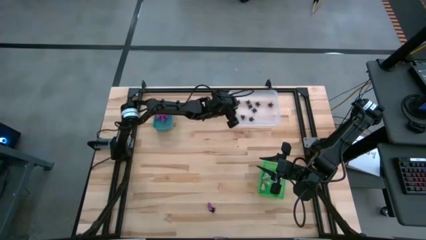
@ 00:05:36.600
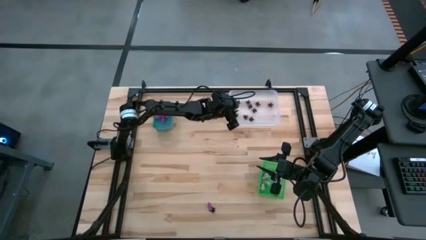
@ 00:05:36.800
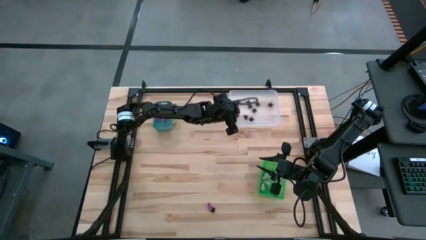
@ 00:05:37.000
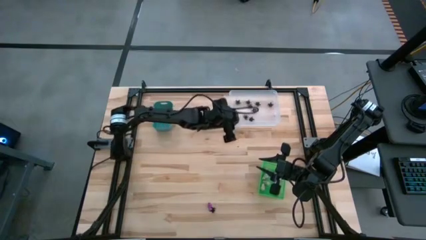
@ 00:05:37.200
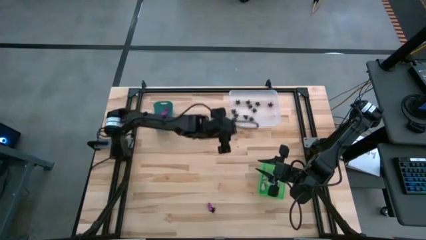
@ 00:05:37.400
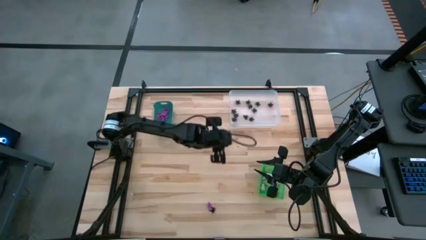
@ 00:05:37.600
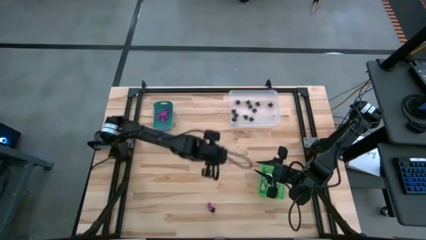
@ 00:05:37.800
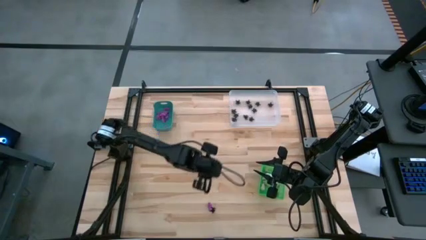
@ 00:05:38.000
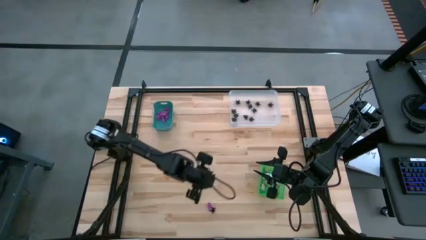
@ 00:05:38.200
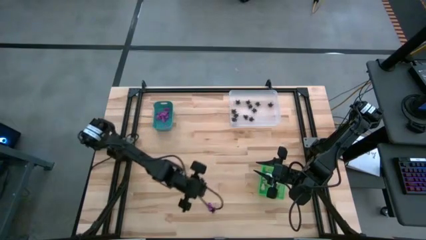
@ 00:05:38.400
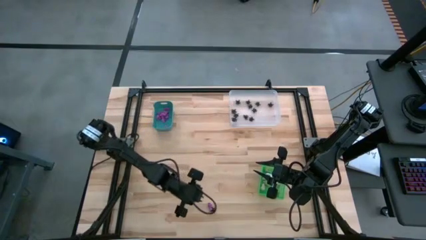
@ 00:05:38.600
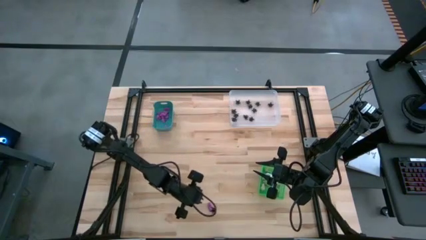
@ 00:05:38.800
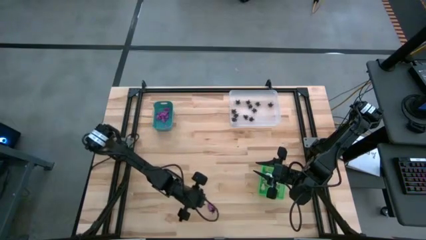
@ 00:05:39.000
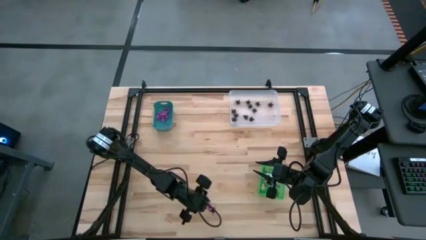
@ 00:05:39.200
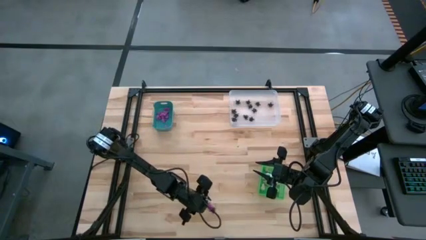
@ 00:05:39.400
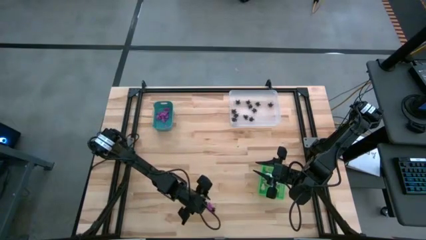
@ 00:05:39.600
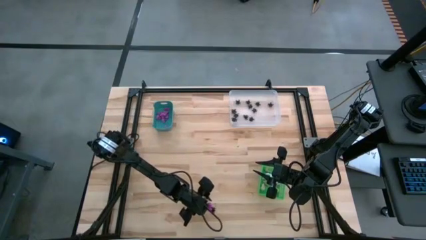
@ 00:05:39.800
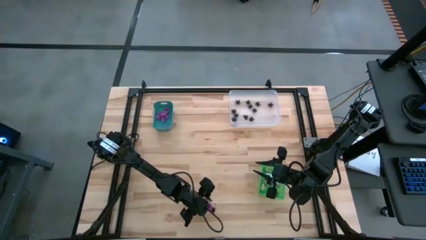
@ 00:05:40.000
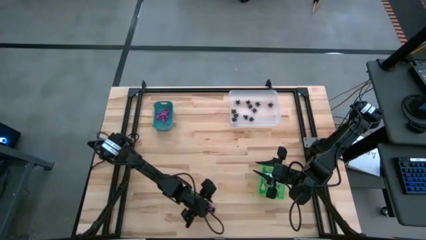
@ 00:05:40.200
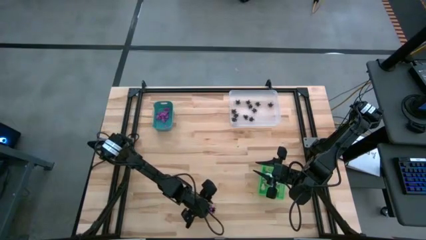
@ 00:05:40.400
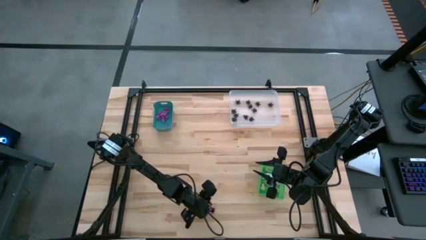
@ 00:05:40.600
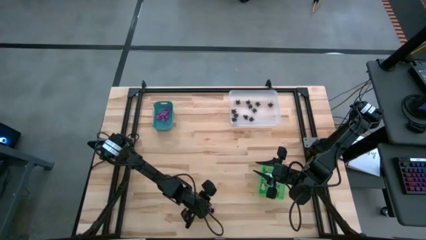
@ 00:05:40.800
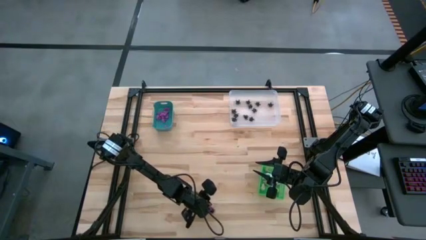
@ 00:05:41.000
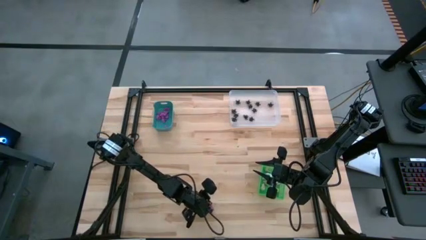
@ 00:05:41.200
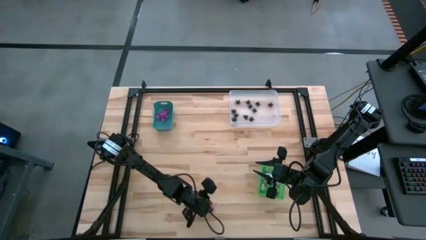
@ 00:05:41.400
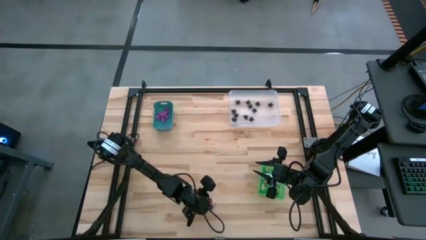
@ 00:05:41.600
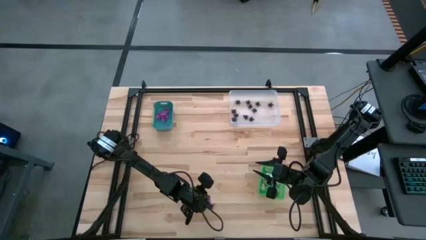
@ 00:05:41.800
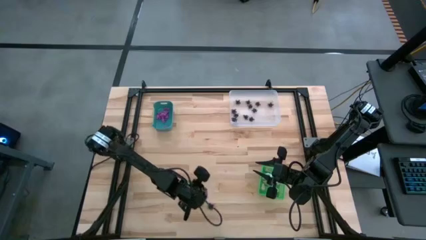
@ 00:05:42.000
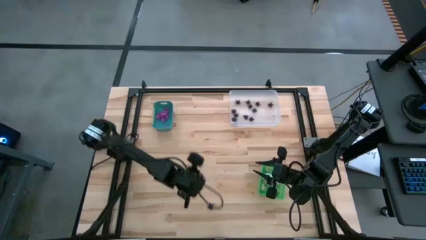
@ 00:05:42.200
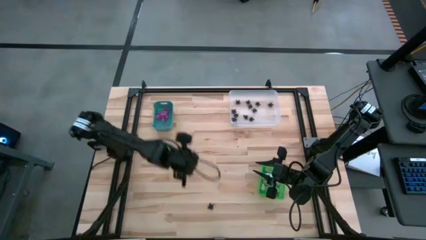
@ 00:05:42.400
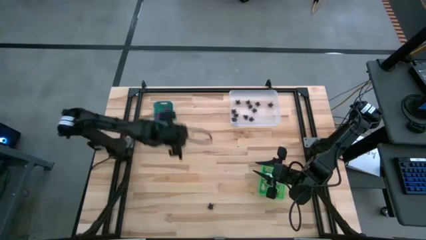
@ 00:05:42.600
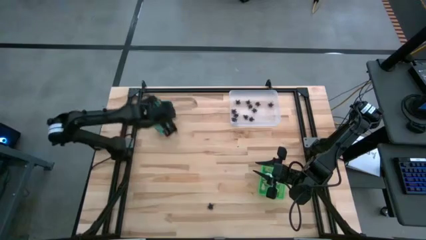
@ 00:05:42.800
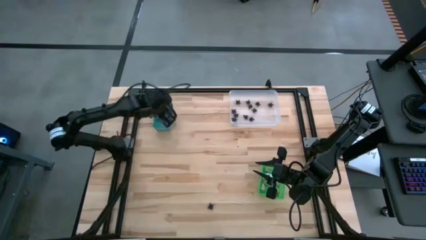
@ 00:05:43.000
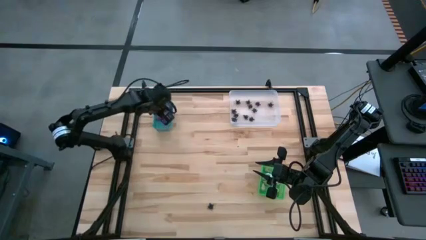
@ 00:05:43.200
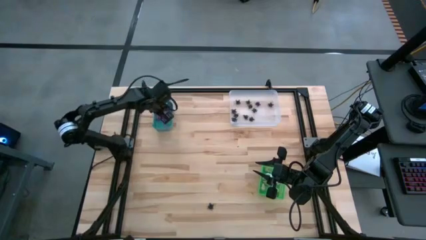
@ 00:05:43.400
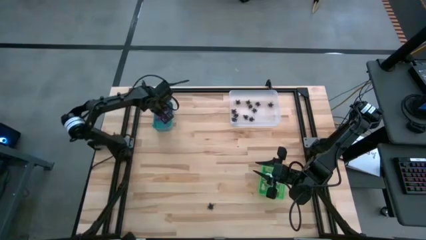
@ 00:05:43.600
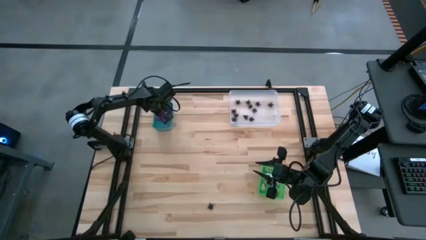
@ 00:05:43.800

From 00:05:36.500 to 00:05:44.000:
Task: Sort Halloween decoration
Put the purple skeleton toy into the blue bin

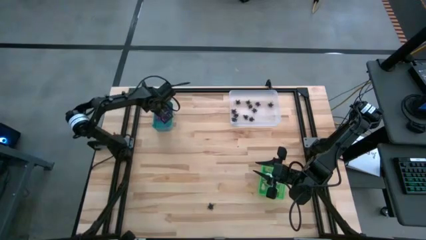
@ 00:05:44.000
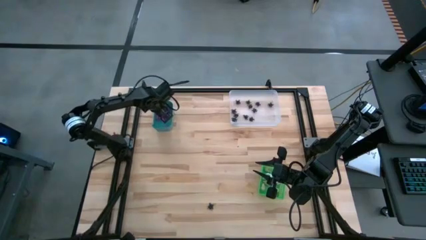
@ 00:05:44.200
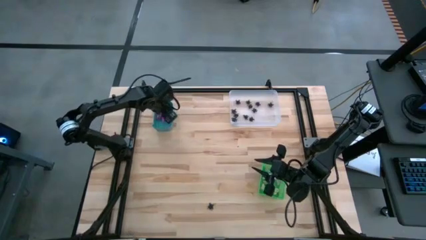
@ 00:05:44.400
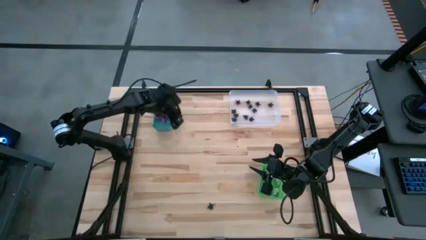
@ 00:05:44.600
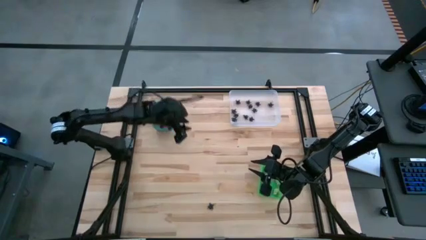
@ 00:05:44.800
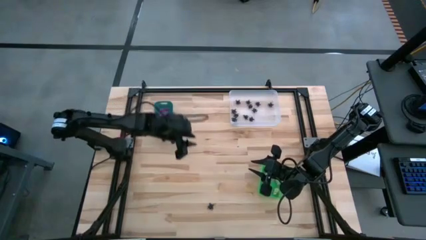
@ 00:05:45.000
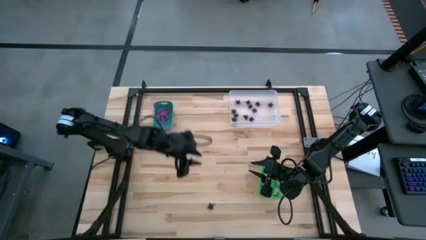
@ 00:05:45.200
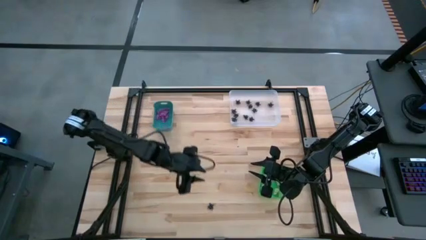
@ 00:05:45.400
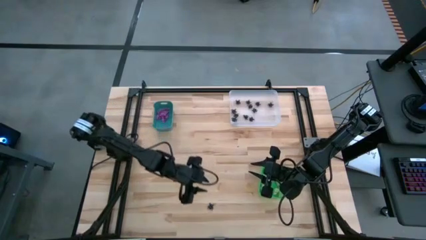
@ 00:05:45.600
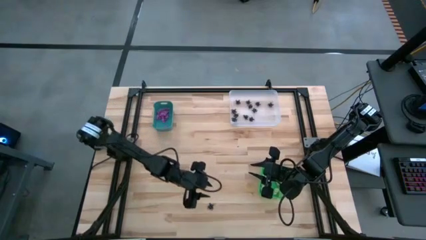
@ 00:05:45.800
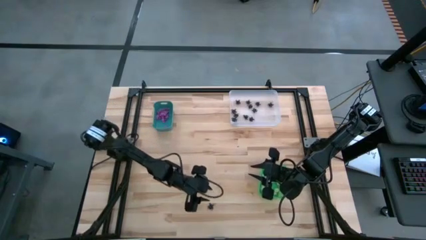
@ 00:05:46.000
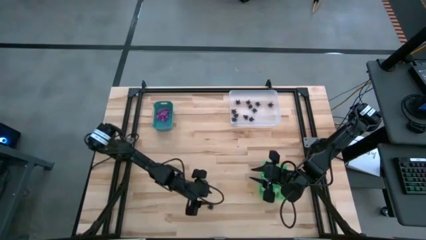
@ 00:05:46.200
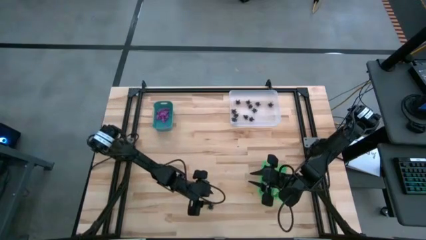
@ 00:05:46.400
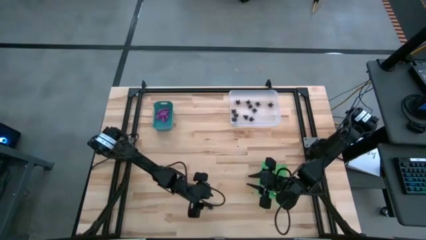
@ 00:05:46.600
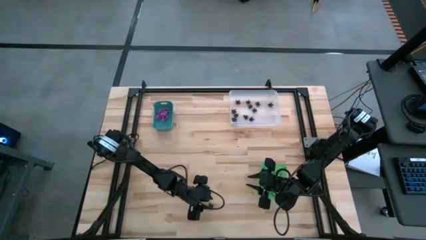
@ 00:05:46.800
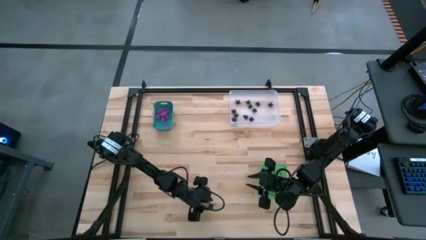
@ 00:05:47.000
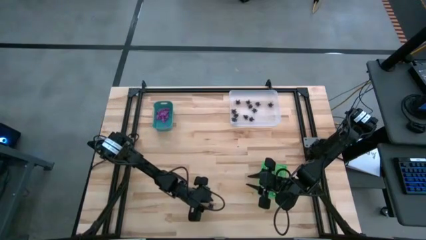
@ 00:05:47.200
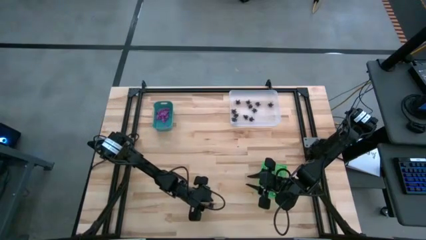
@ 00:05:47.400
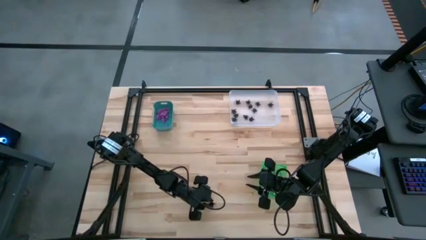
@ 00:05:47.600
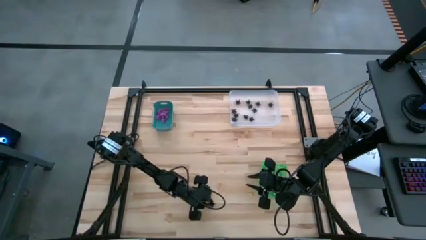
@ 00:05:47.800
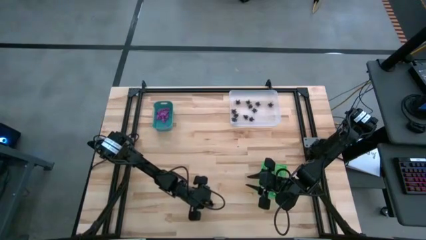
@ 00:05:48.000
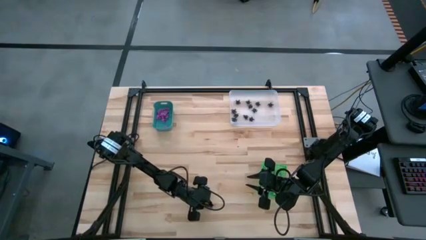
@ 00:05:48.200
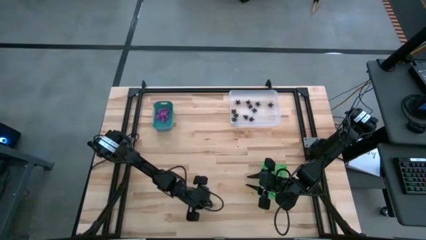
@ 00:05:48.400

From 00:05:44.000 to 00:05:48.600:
Put the black spider toy into the white bin

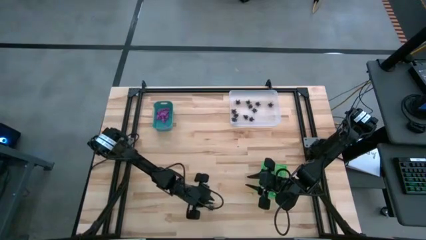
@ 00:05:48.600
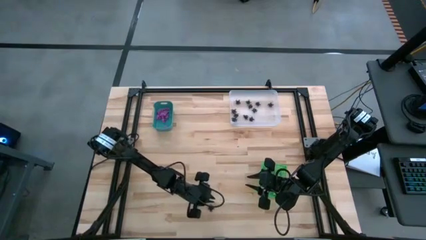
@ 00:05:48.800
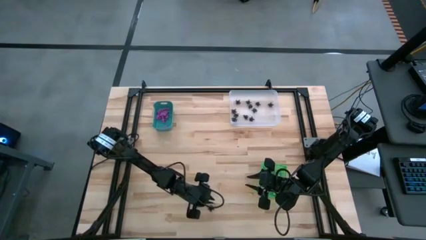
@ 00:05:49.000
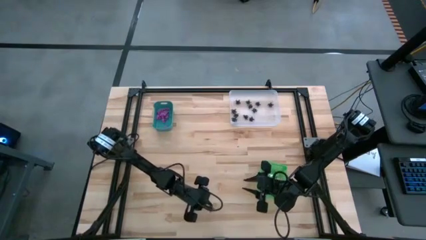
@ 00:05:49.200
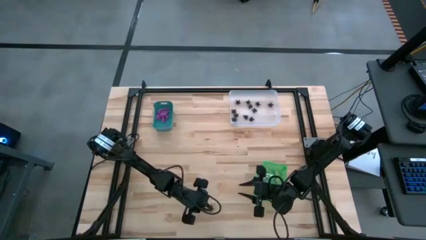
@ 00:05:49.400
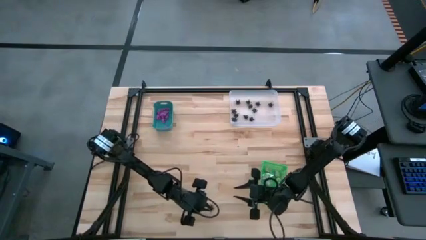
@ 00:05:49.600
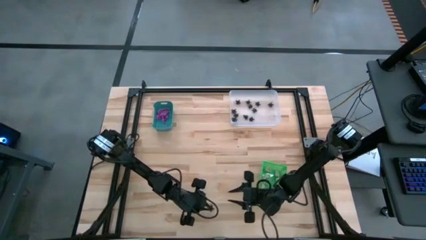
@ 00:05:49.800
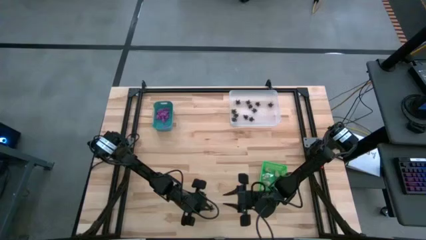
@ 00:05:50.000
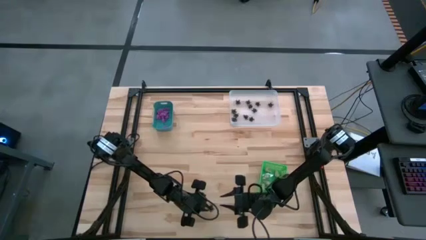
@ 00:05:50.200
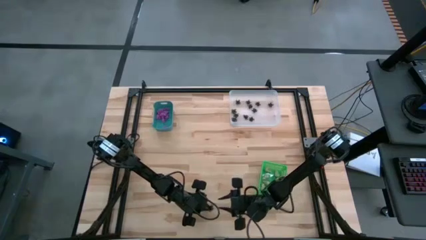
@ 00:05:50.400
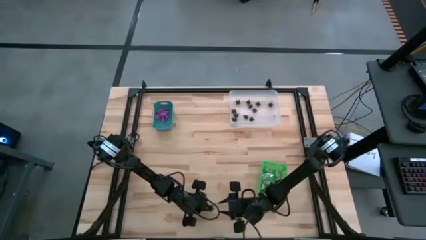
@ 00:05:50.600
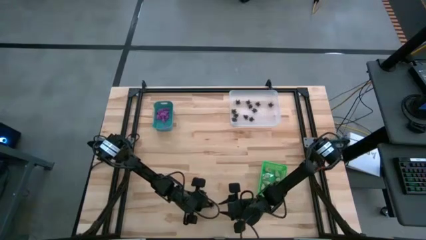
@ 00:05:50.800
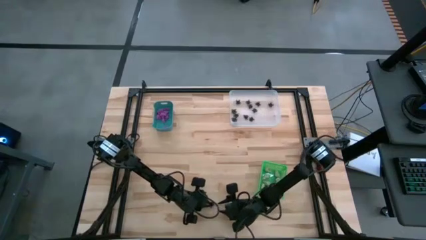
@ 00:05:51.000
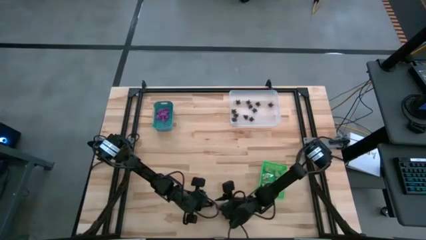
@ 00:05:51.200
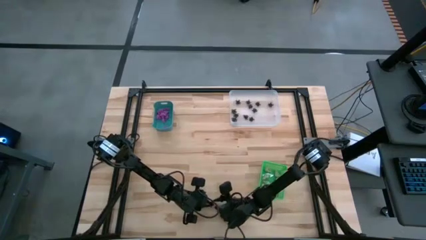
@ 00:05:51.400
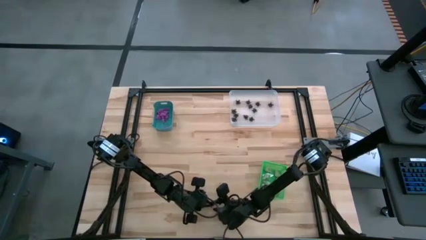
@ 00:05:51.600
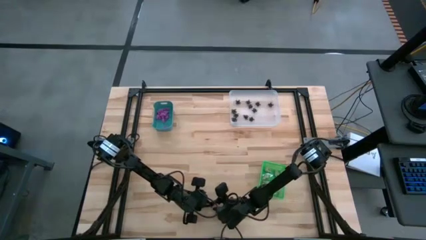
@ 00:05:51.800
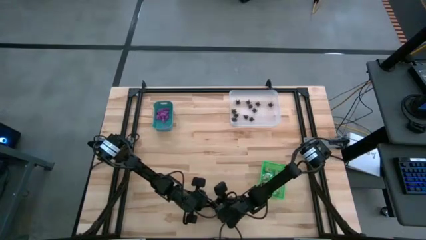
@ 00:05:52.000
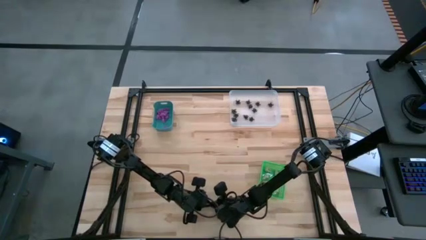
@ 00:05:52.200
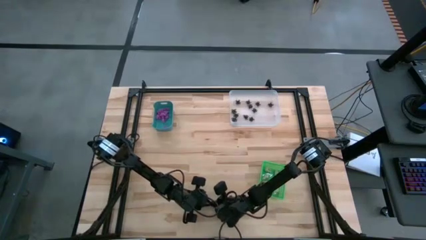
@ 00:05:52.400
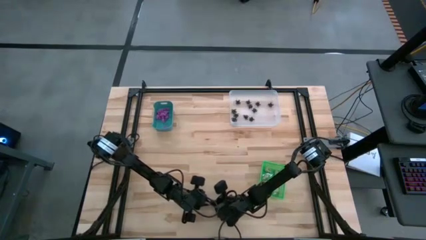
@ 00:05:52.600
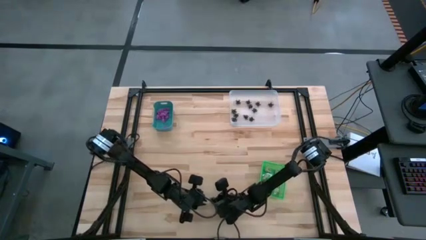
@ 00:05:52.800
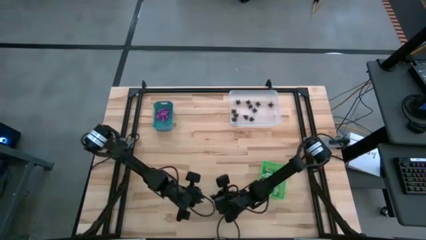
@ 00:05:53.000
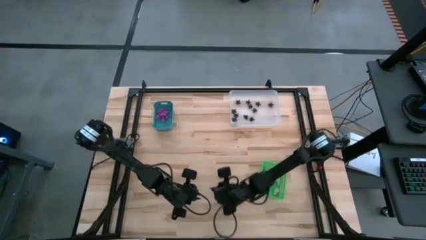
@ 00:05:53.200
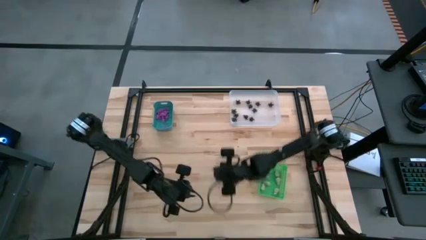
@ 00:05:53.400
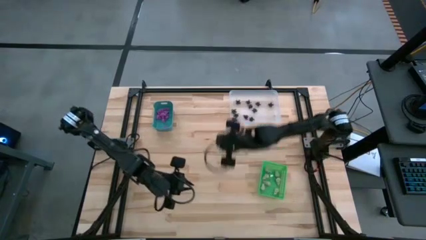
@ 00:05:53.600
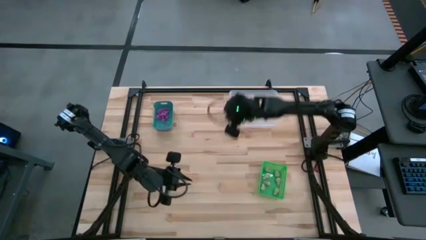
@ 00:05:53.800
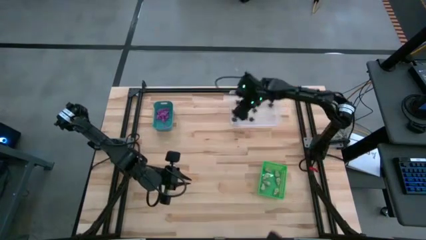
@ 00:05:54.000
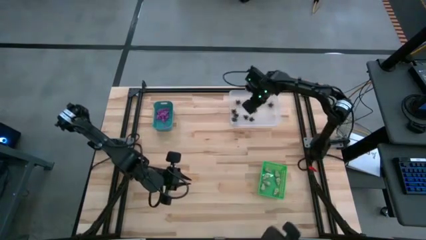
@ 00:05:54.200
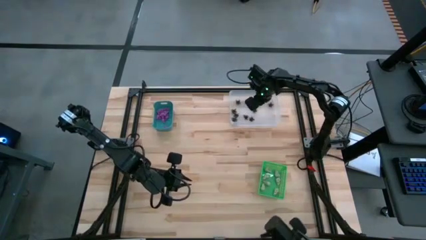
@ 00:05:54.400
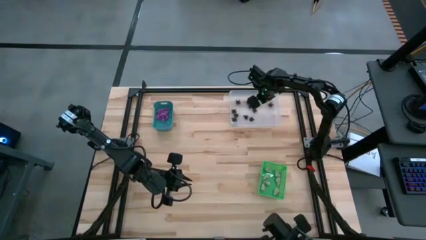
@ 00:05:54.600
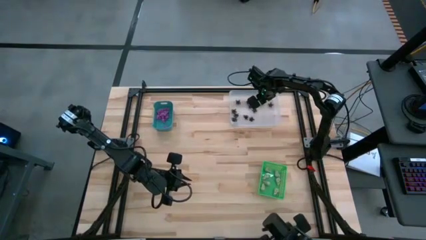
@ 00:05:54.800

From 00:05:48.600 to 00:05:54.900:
Put the black spider toy into the white bin
